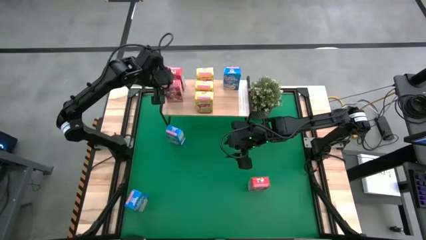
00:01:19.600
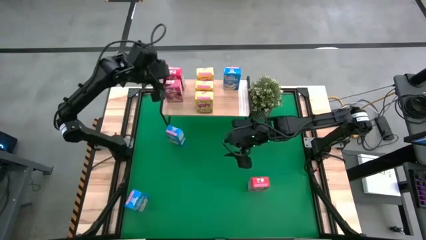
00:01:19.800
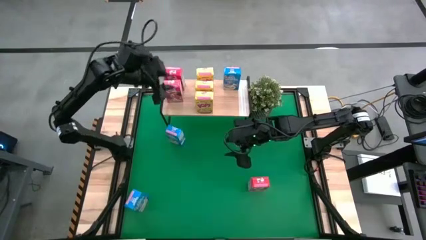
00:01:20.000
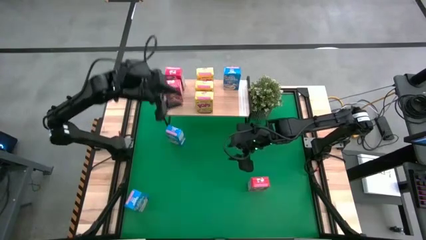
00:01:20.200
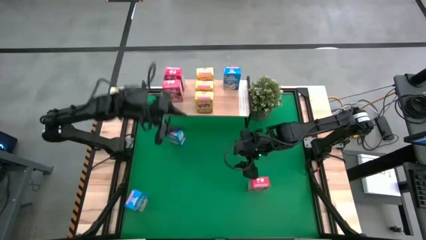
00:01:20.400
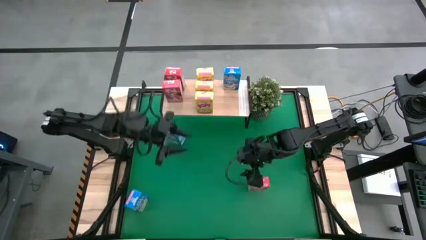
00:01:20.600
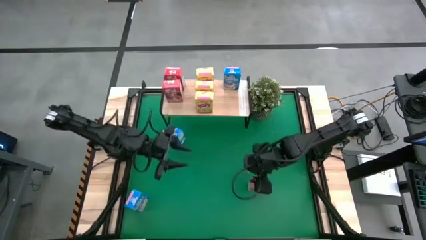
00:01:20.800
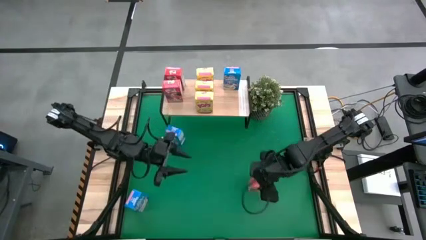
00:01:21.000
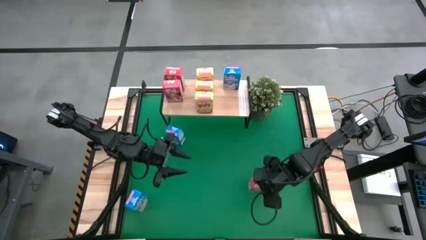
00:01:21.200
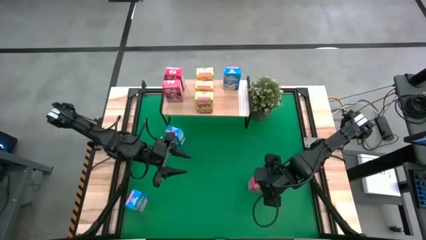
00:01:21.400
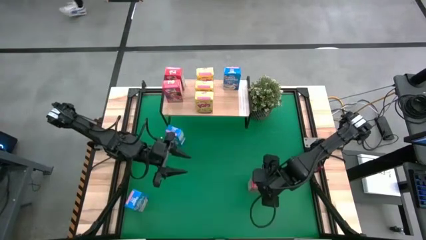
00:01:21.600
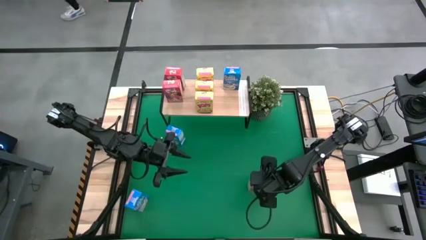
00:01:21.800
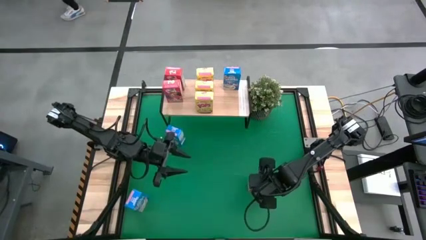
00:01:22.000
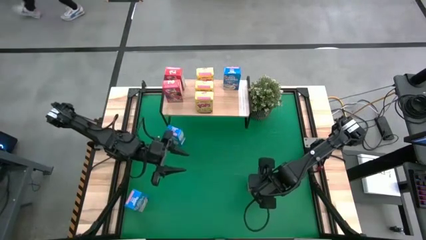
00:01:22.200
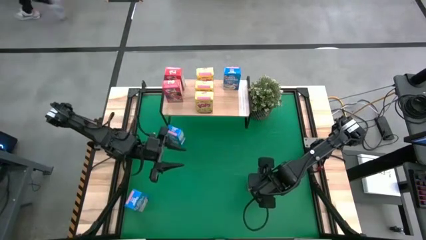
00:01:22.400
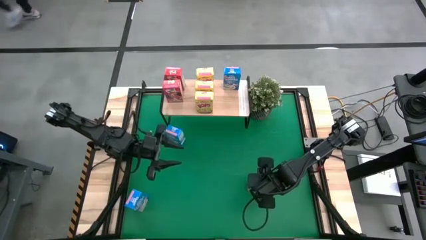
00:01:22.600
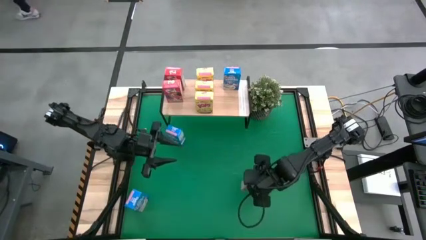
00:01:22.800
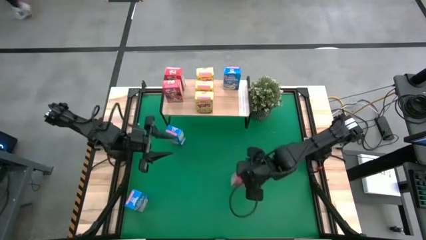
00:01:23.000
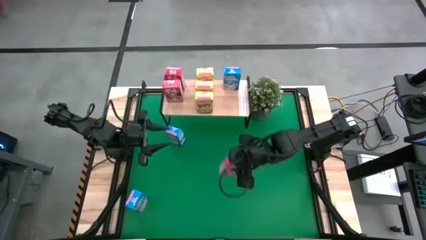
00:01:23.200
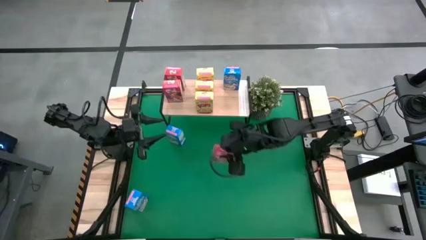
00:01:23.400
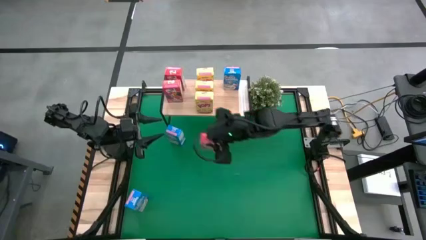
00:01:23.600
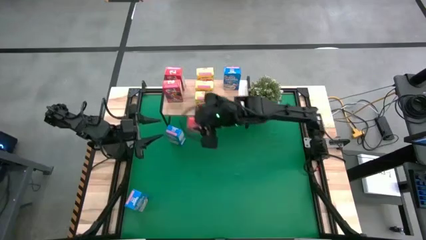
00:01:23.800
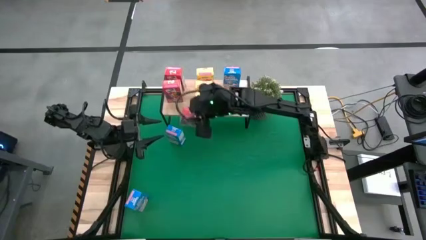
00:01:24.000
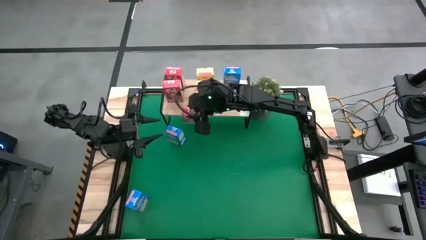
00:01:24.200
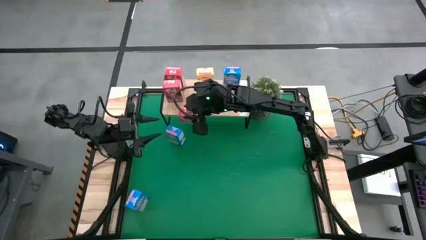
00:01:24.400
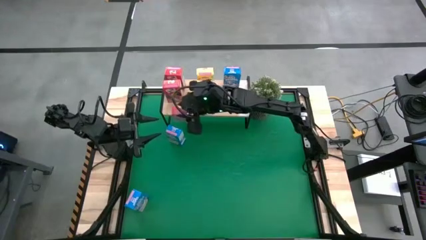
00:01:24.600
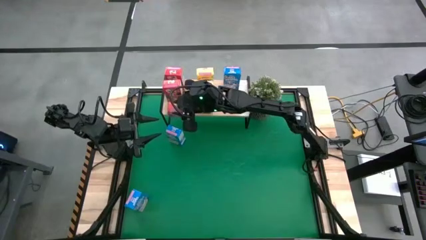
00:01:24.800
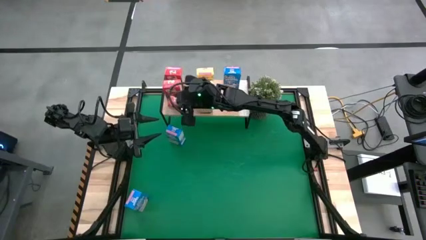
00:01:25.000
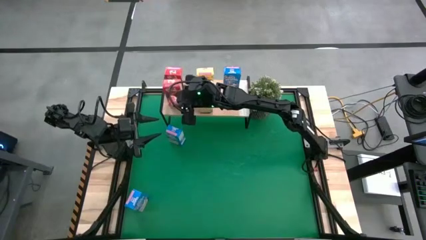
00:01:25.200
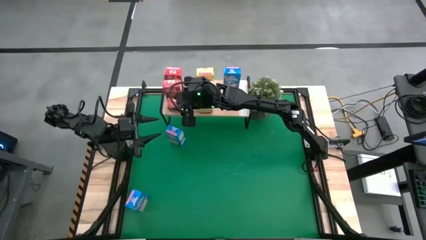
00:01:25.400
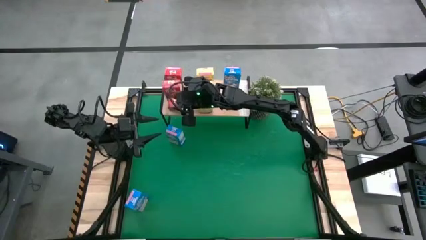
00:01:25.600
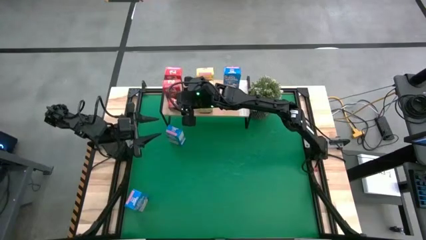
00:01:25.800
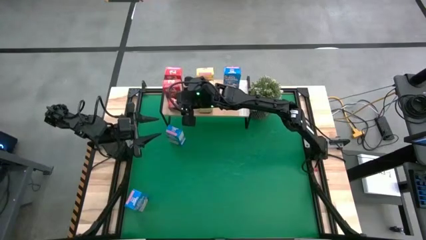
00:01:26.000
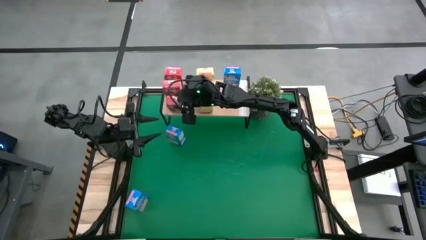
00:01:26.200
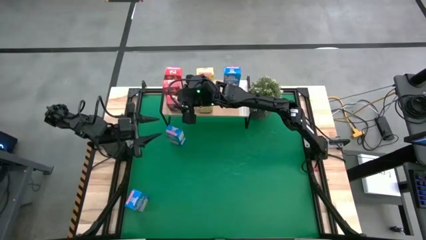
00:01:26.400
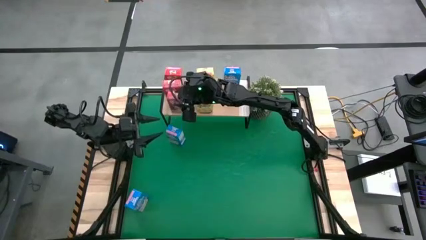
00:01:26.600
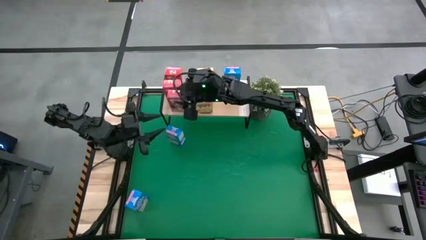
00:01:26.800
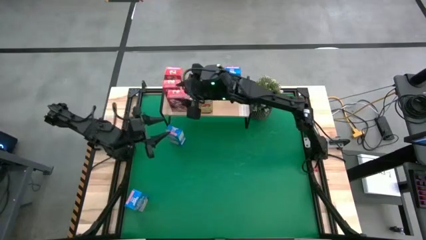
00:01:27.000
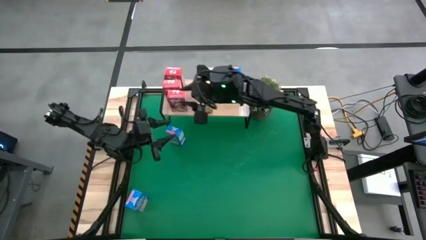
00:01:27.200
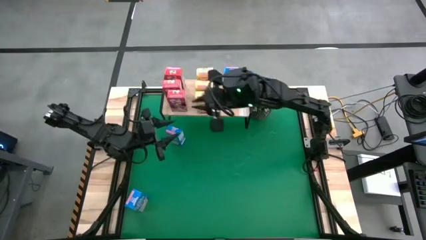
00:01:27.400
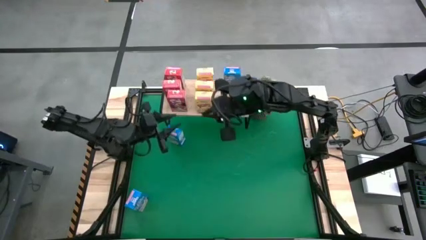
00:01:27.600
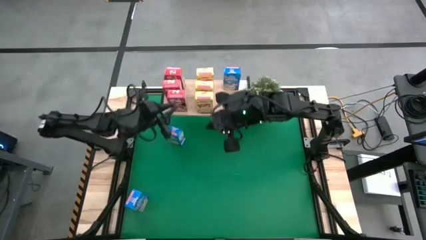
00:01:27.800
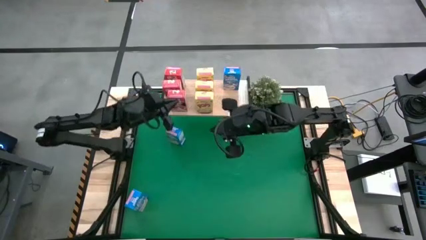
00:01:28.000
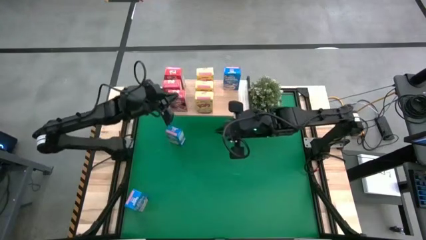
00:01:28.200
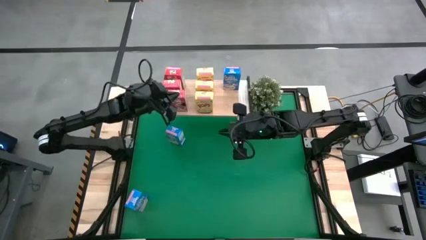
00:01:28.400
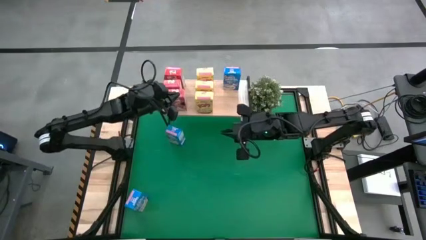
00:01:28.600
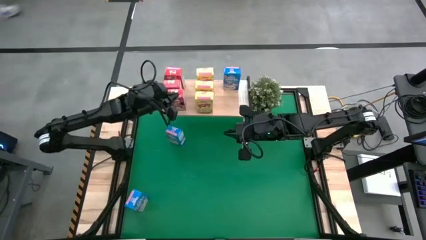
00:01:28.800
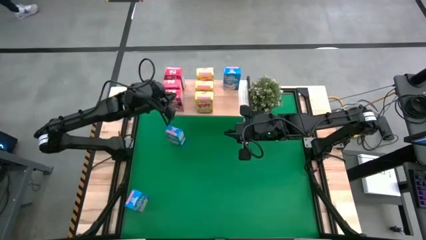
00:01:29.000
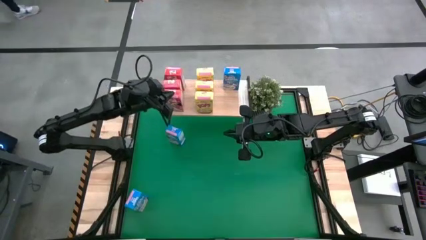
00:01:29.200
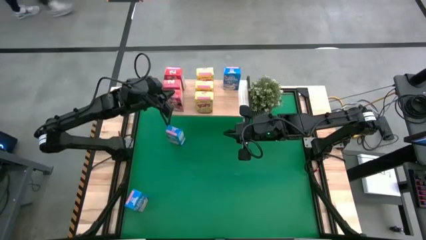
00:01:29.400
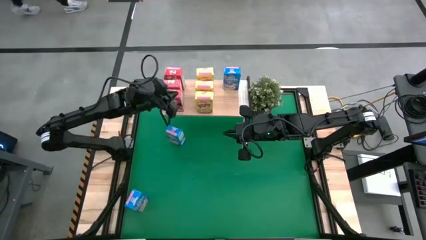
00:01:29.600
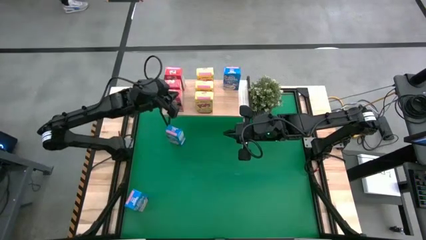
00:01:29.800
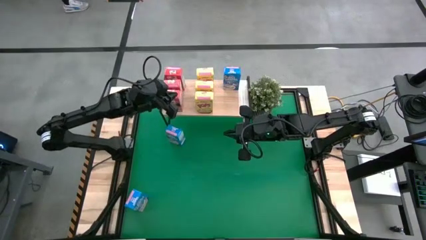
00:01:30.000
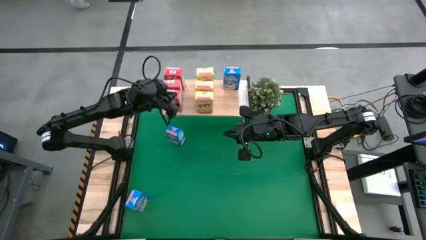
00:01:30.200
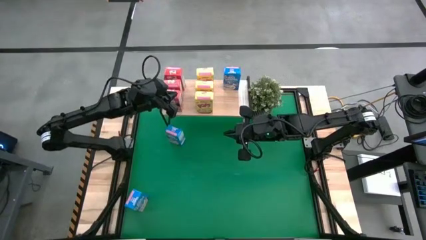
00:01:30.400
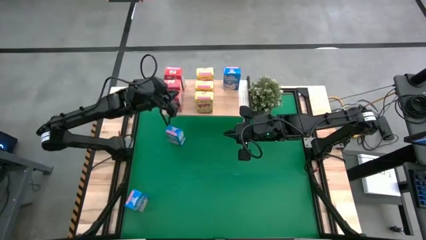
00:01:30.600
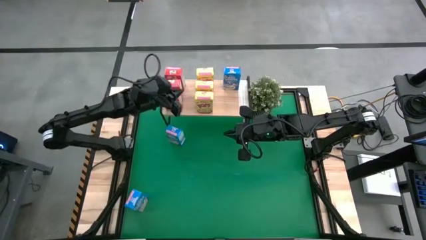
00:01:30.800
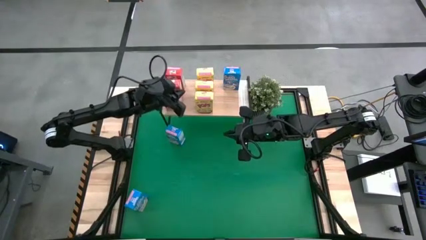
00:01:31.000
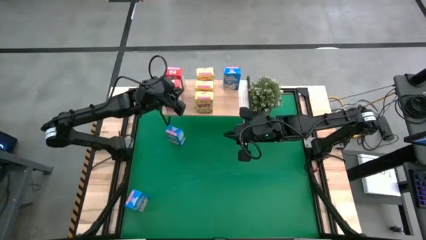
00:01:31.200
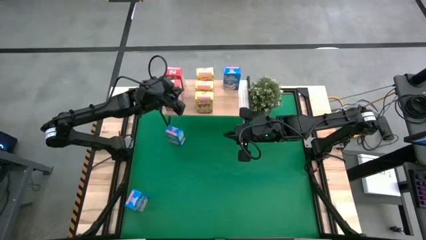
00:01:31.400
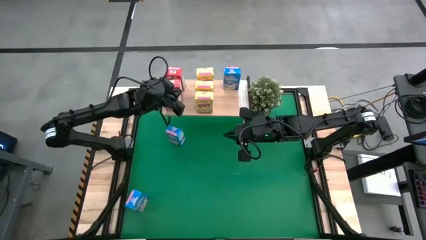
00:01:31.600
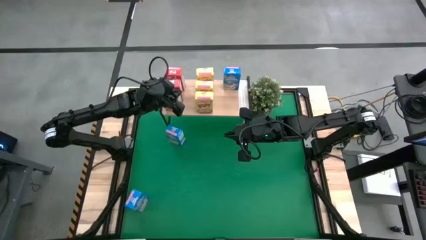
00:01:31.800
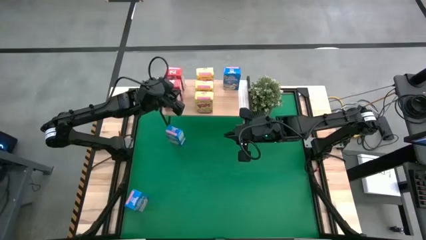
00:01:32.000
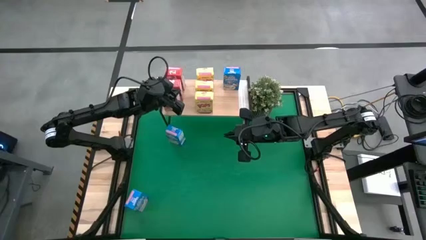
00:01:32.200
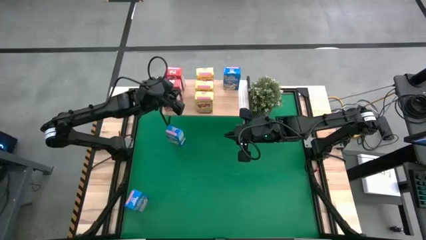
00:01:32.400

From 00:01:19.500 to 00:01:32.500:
Task: Stack cereal on shelf
Put the red cereal box on the shelf aligned with the other red cereal boxes

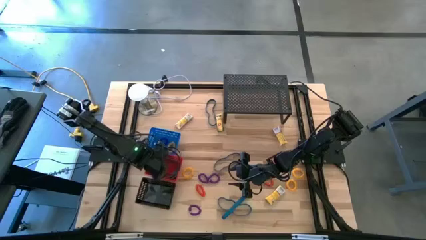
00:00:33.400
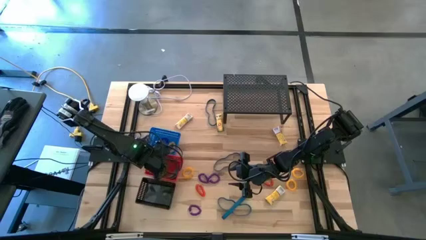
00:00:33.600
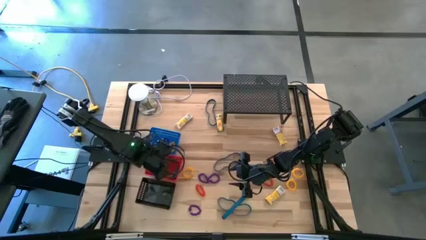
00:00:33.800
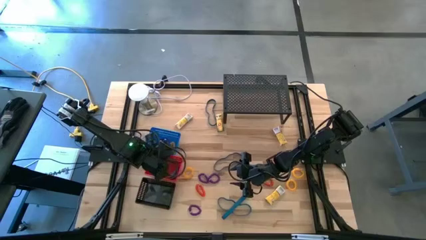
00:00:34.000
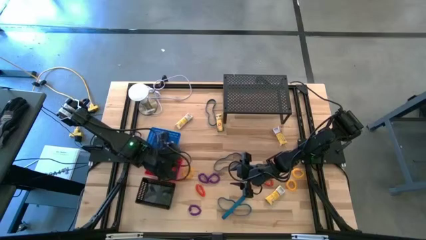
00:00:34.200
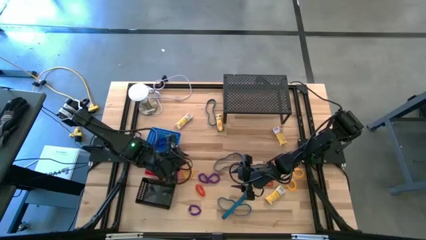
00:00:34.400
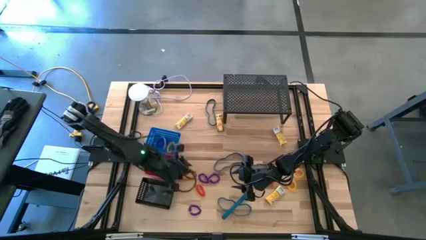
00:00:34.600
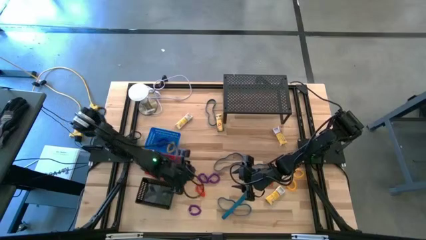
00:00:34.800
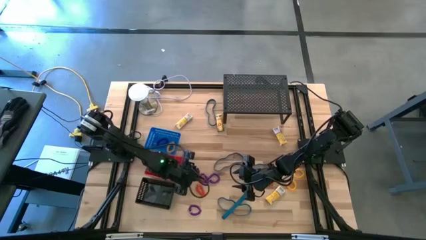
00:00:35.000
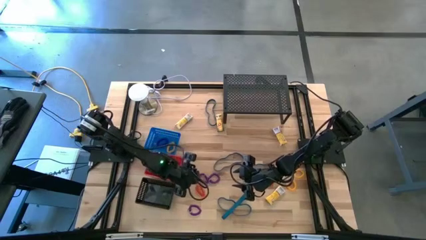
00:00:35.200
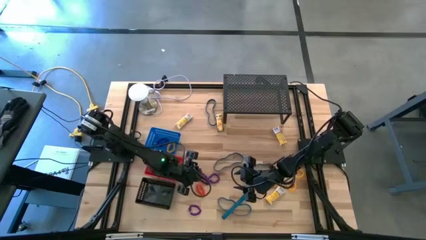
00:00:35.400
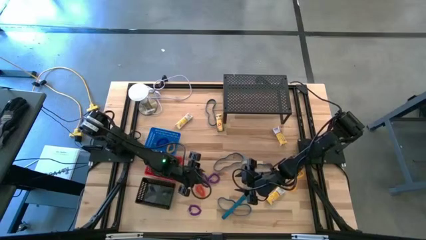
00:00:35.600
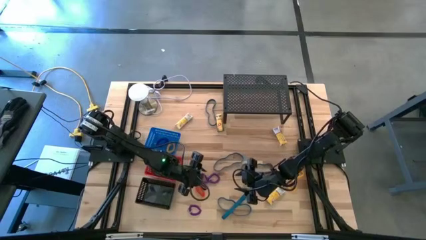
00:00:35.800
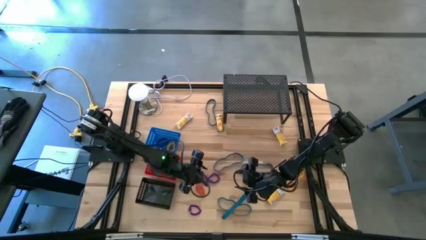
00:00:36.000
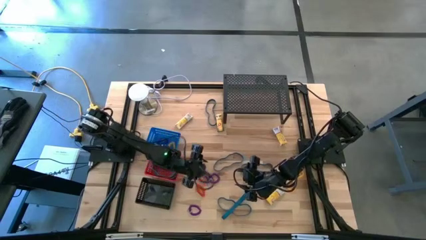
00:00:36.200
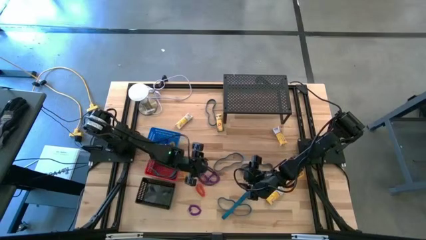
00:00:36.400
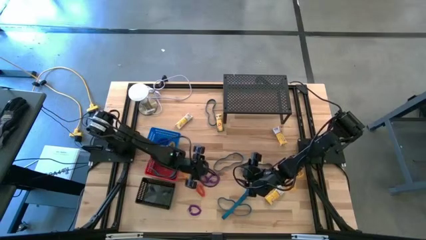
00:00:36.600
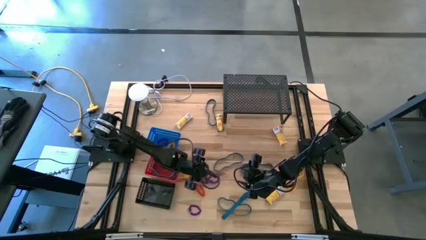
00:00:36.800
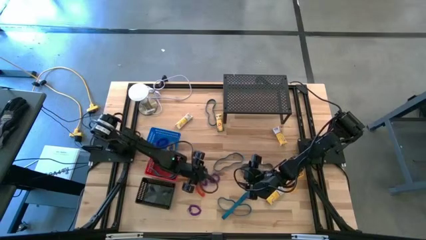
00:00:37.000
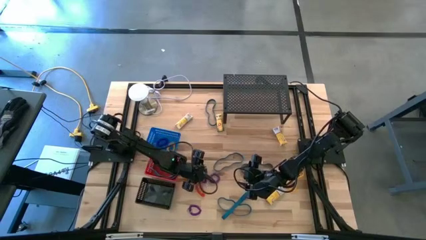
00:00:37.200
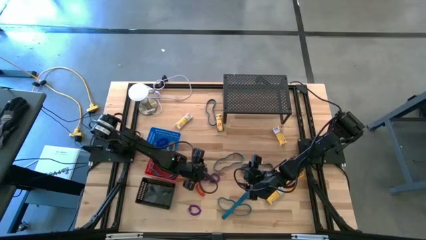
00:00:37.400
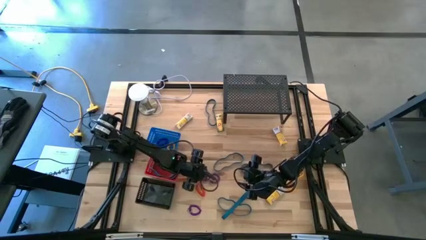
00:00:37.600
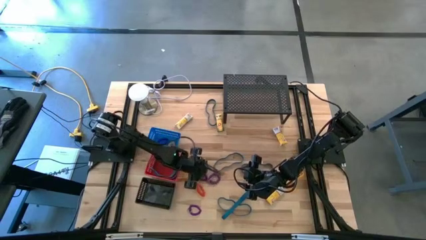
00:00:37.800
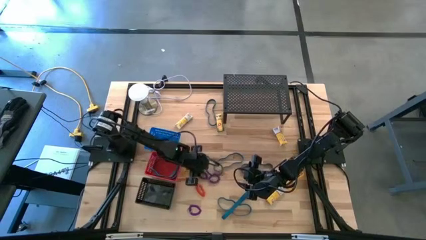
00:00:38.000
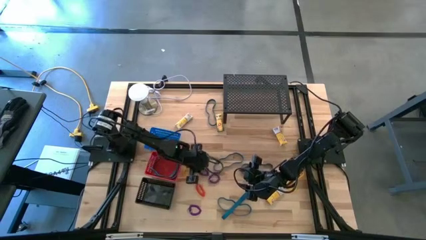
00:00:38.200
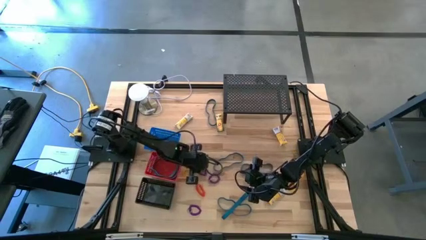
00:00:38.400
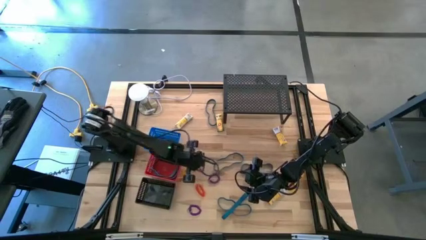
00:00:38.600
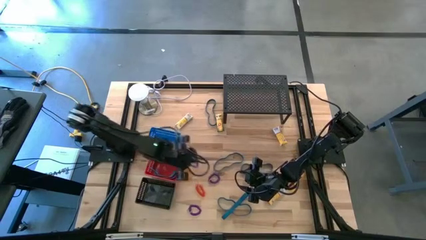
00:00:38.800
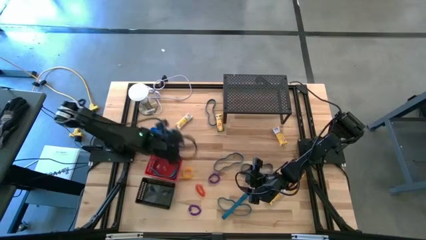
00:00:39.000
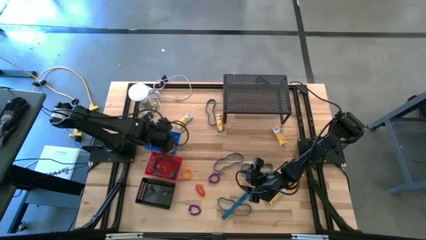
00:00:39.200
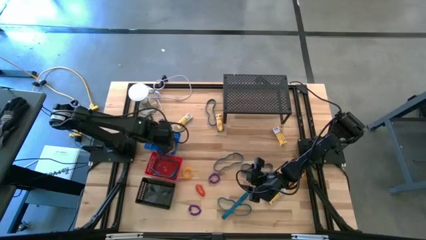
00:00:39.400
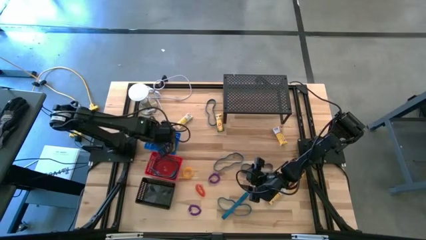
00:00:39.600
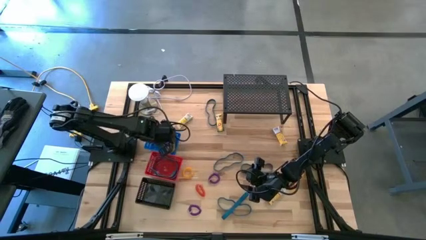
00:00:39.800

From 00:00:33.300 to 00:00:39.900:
Task: Pick & Place Office Desk Supplies
Put the purple spring keychain into the blue bin
